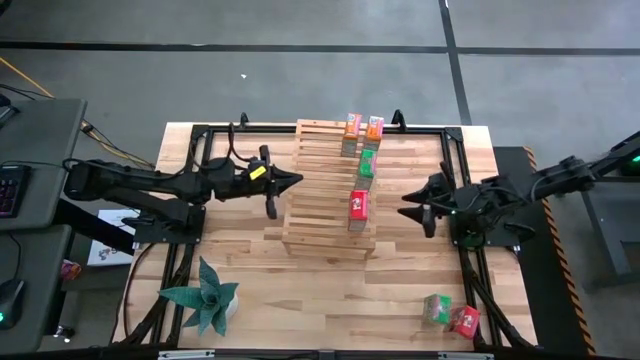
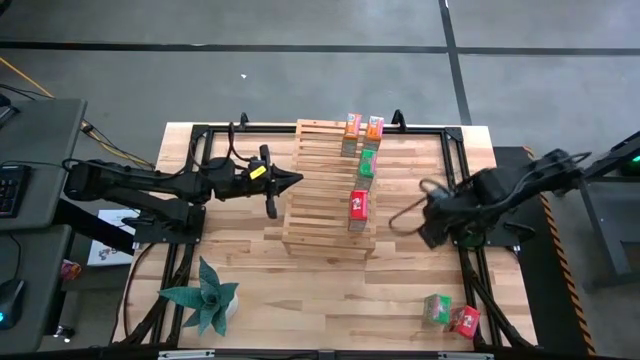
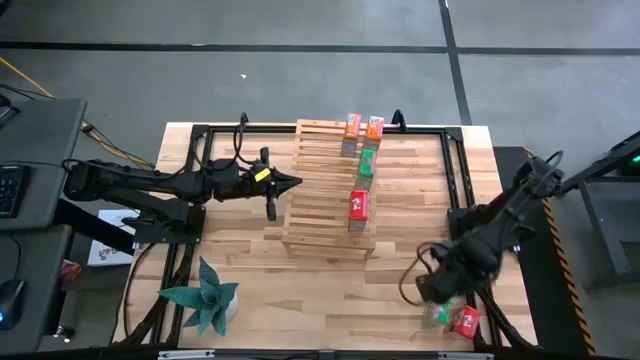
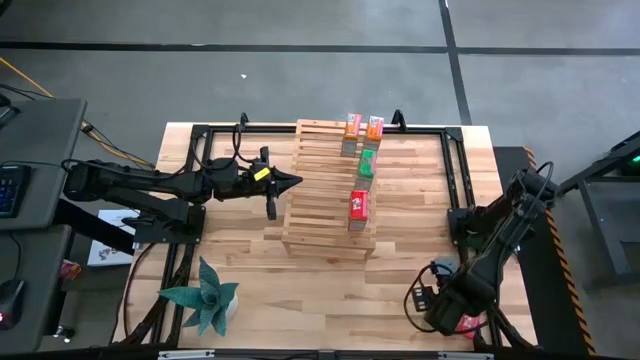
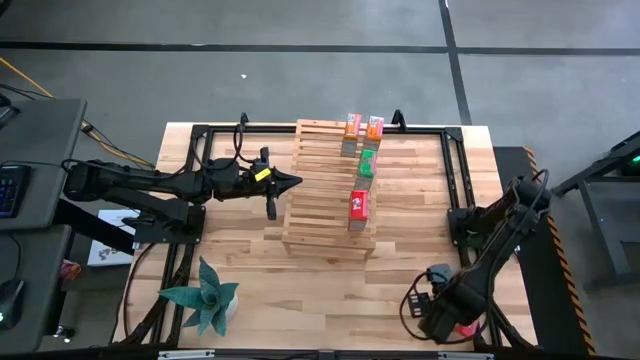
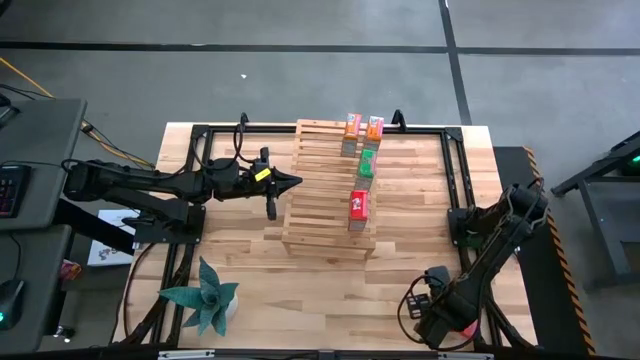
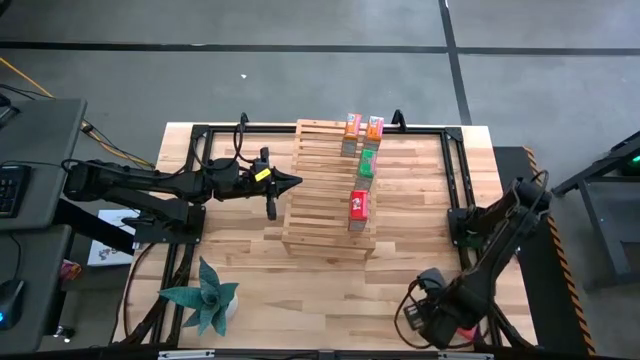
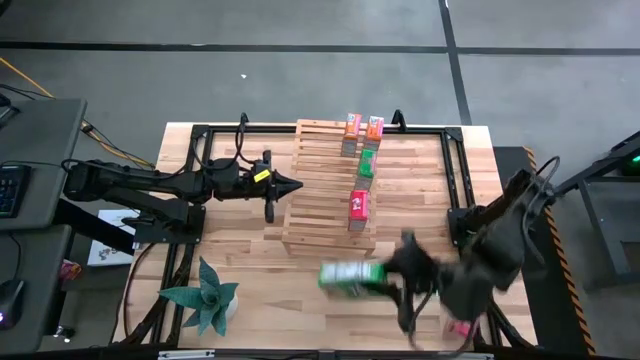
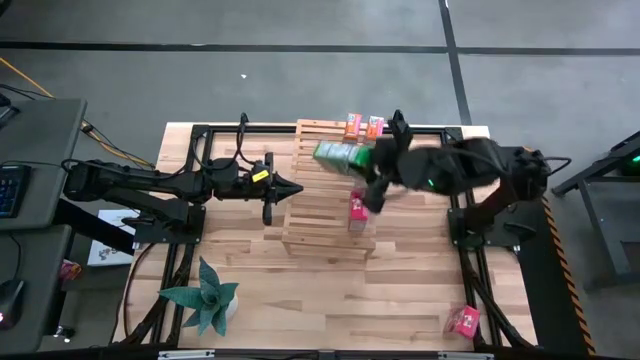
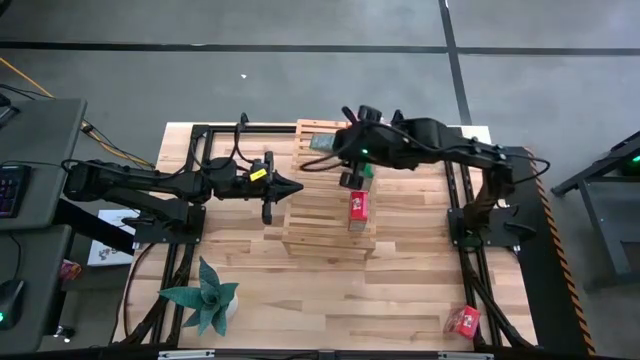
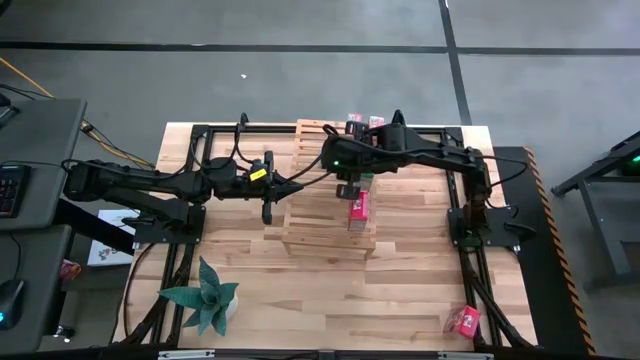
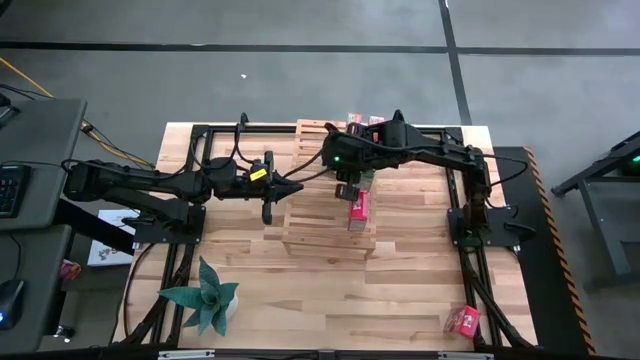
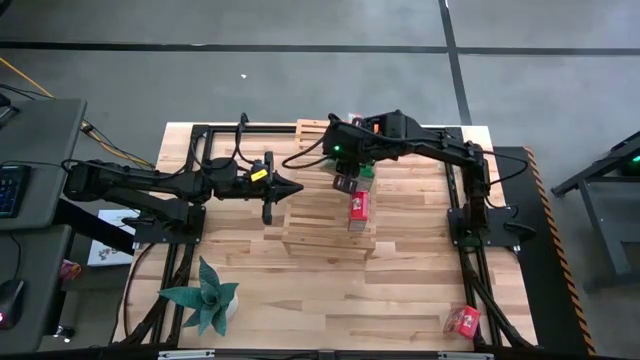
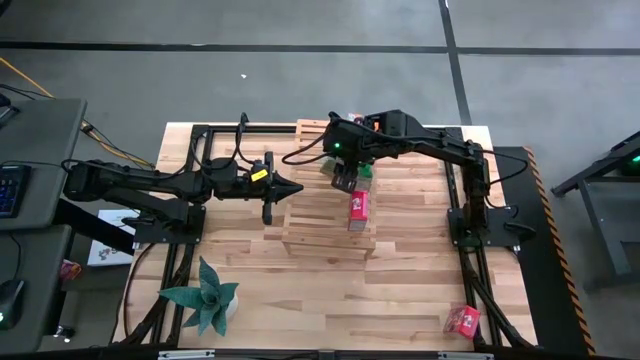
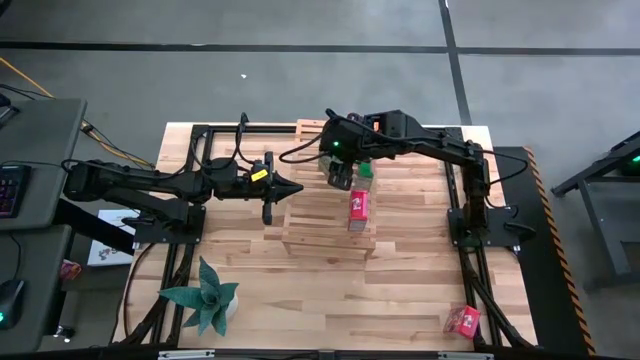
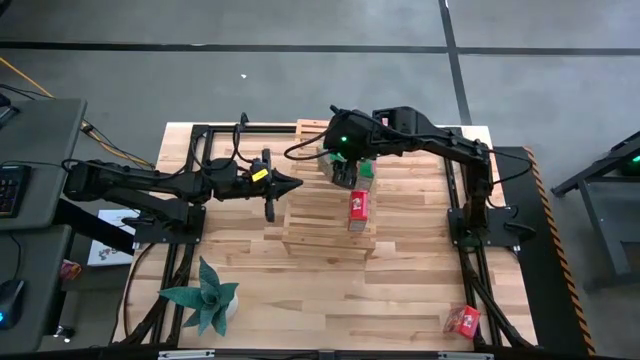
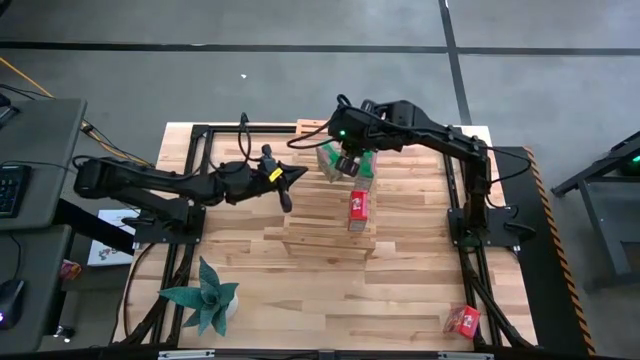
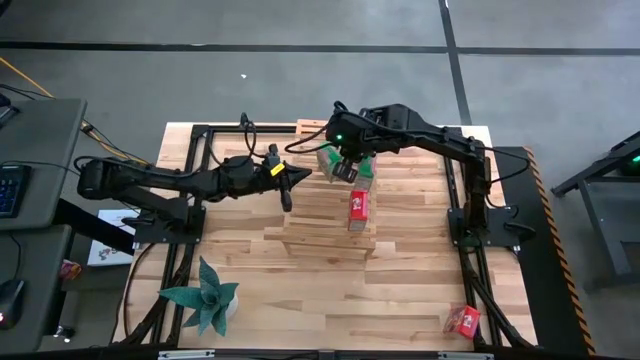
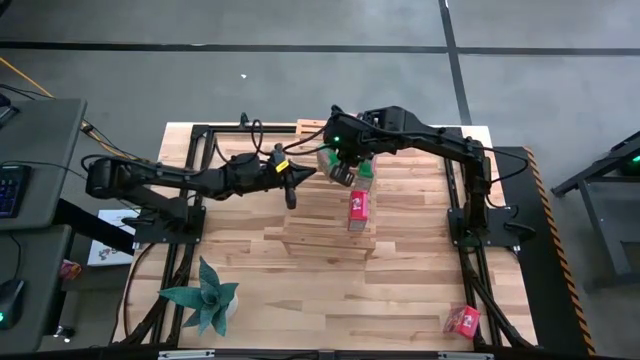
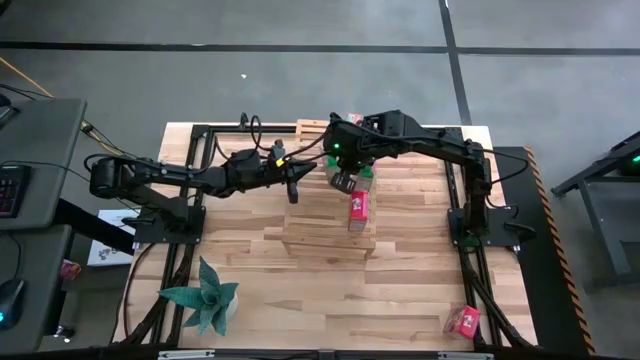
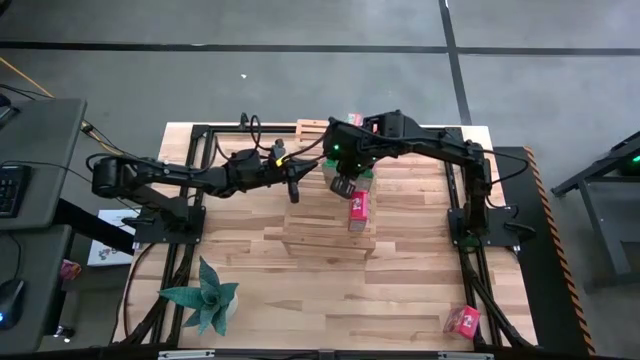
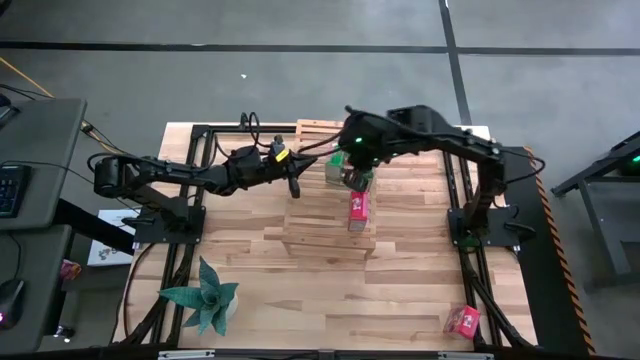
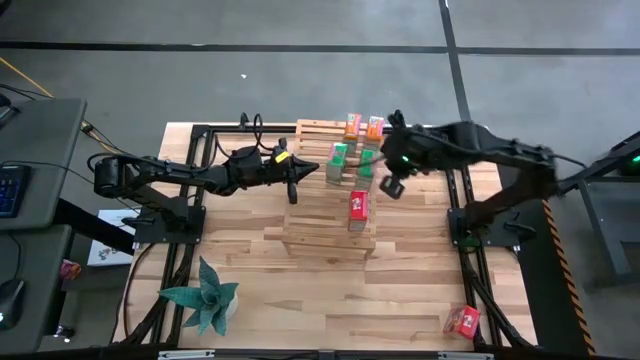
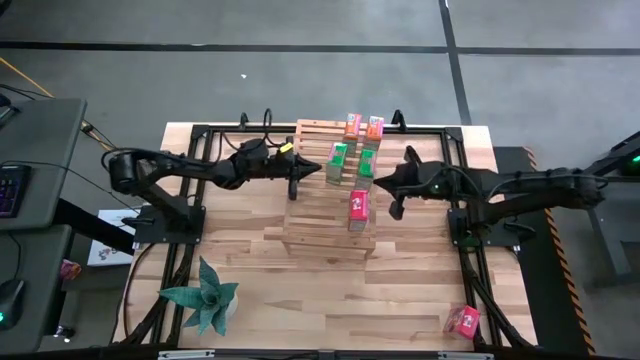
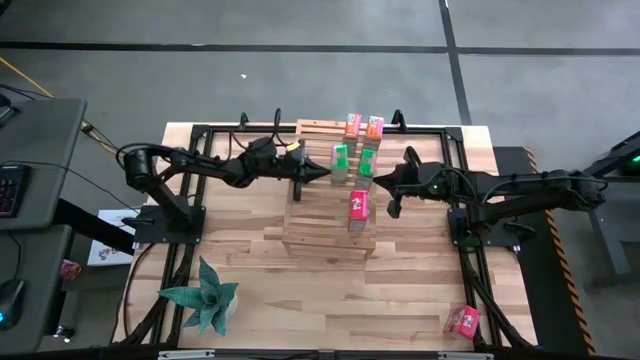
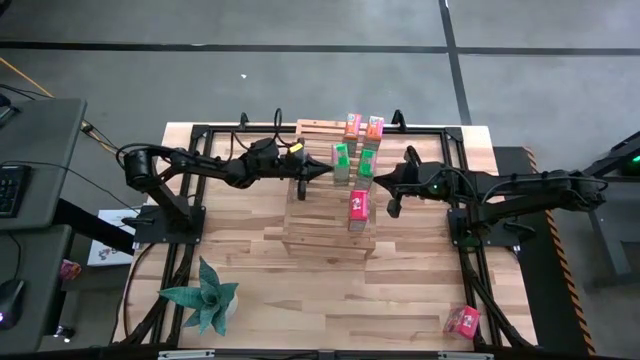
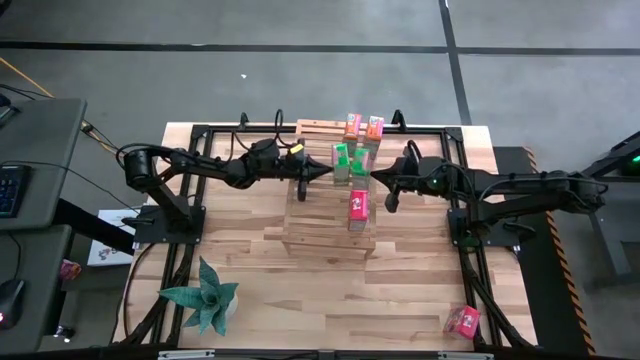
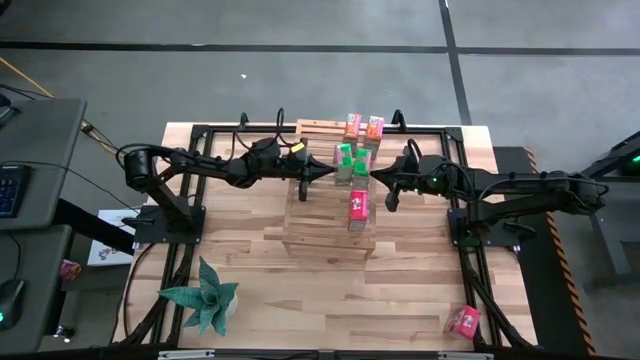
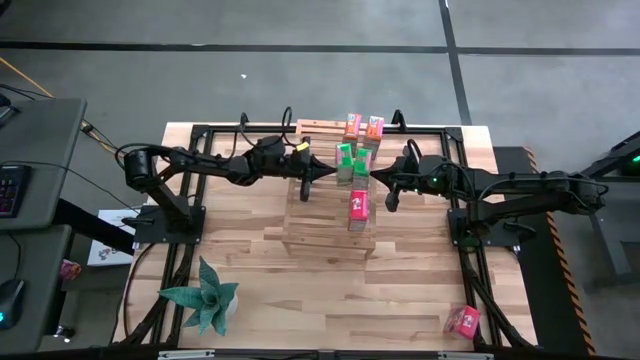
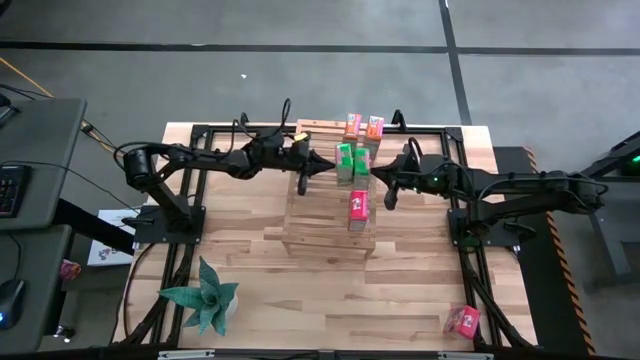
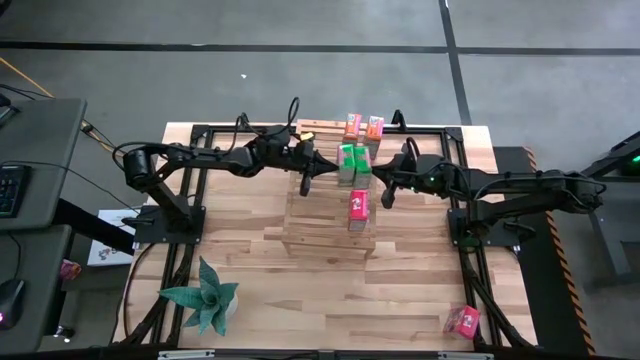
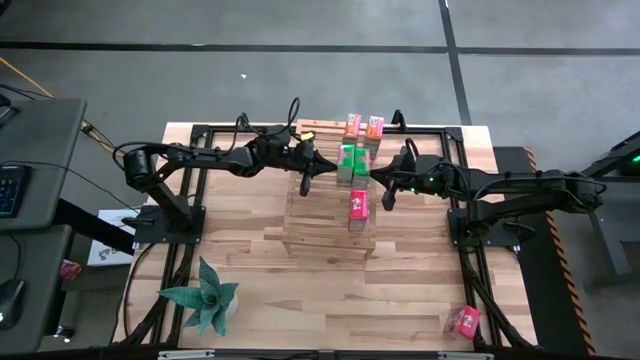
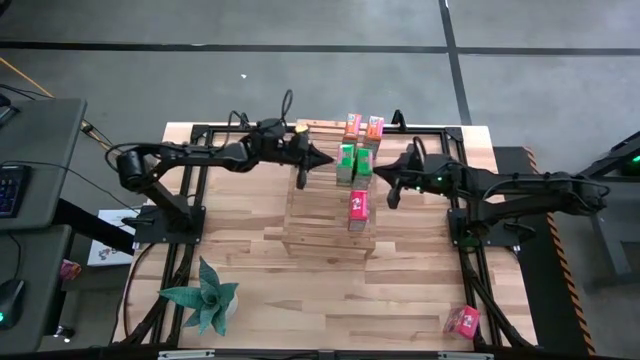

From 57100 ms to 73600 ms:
Task: Stack cereal on shelf
Put the green cereal box on the shelf aligned with the green cereal box

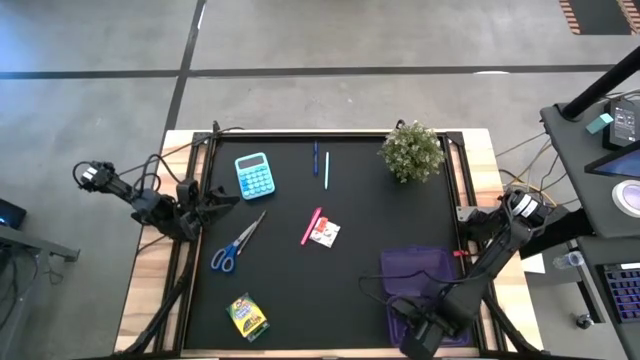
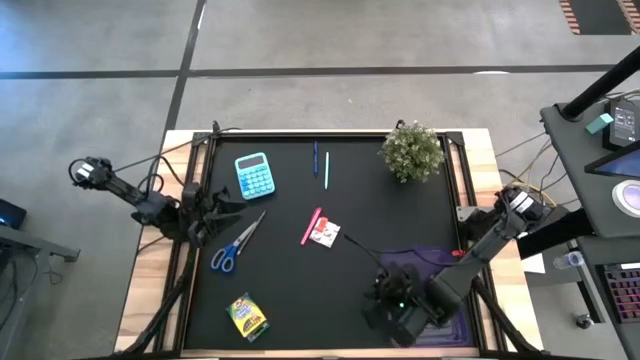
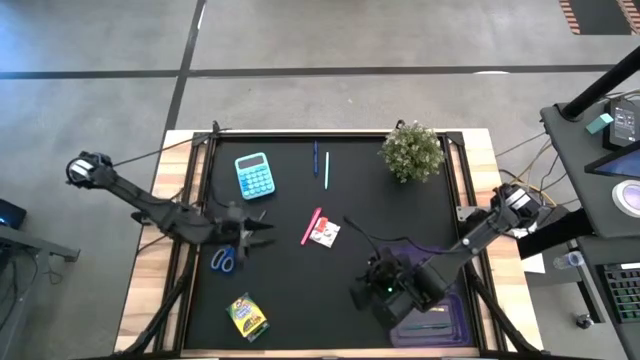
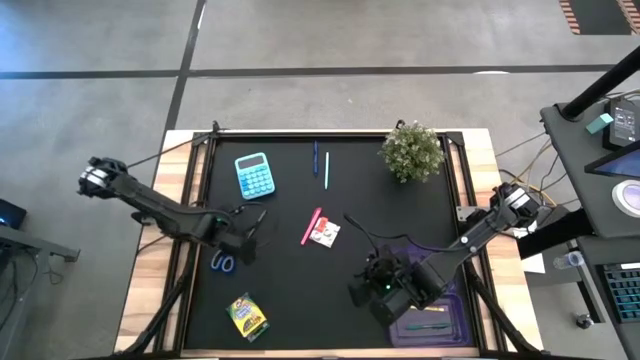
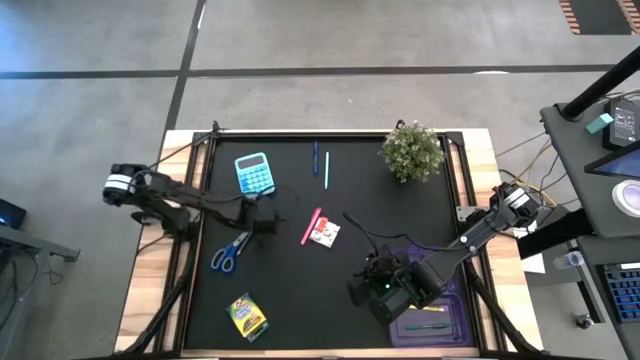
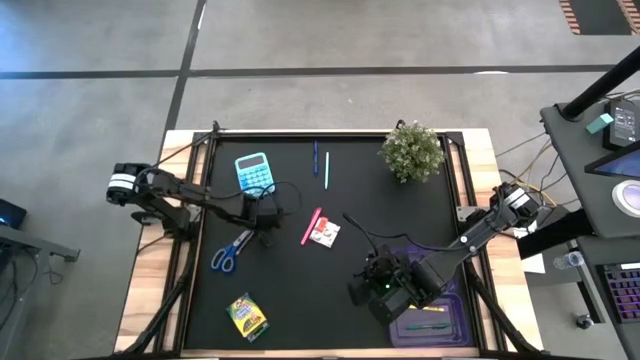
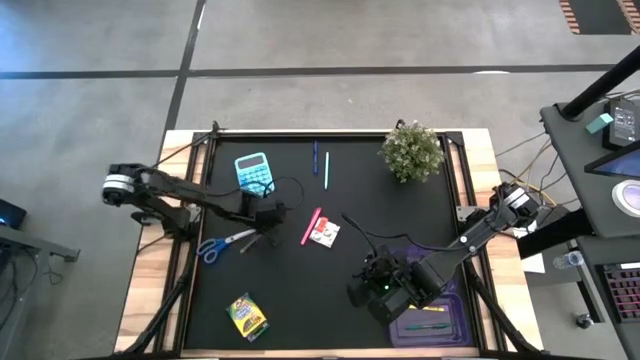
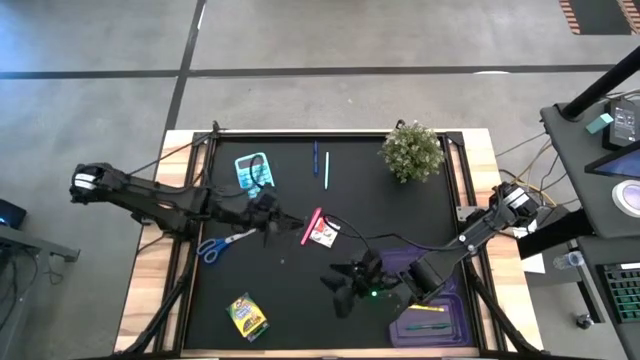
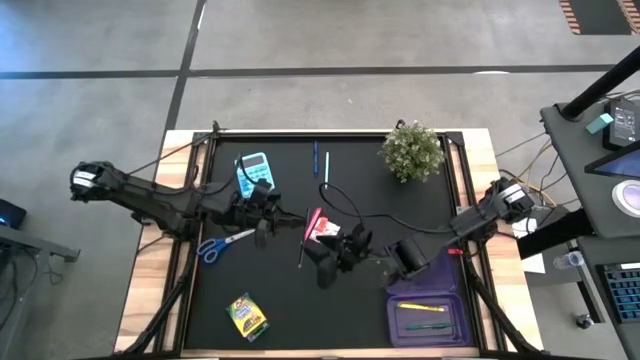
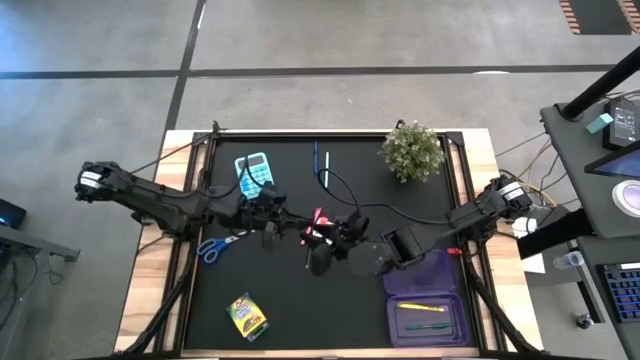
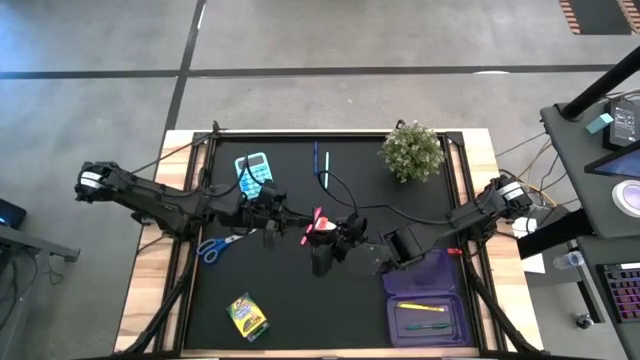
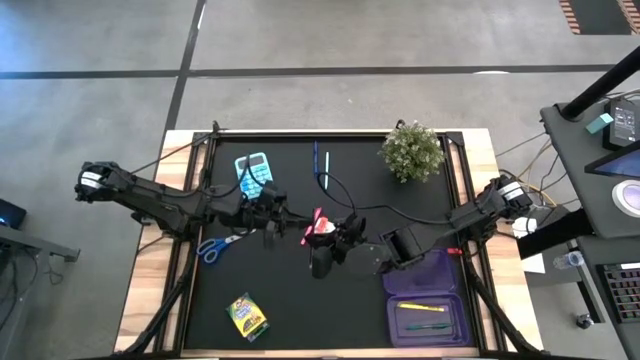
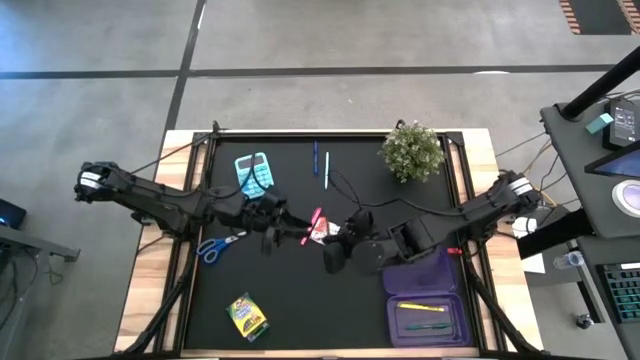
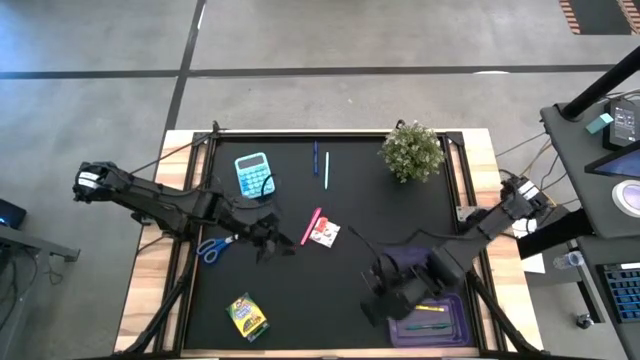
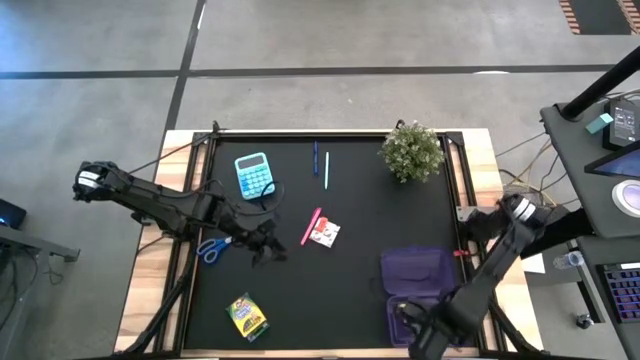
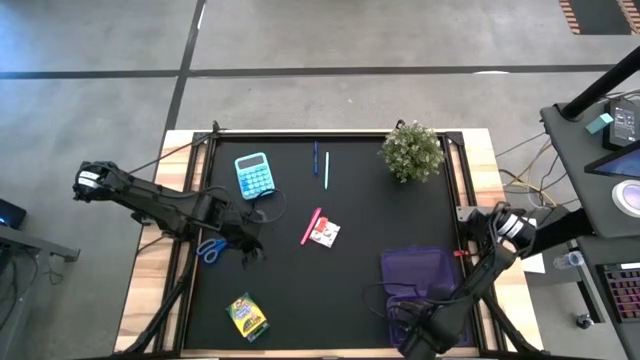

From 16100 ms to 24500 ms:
Task: Pack school essentials
Put the blue pencil into the purple supply box
